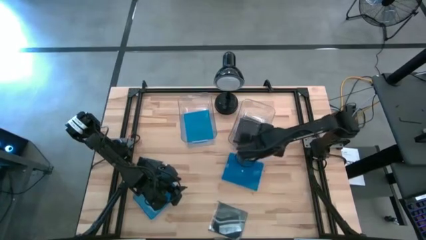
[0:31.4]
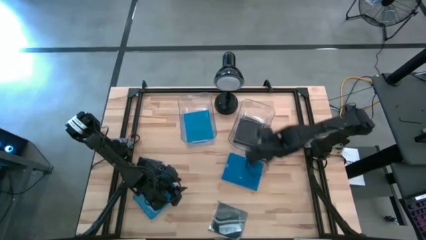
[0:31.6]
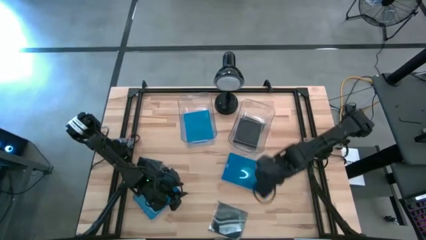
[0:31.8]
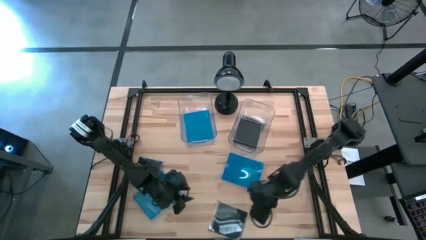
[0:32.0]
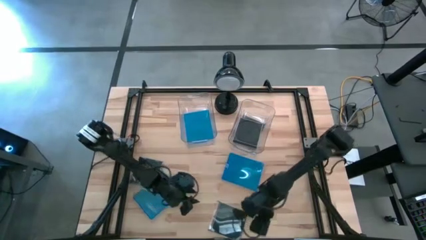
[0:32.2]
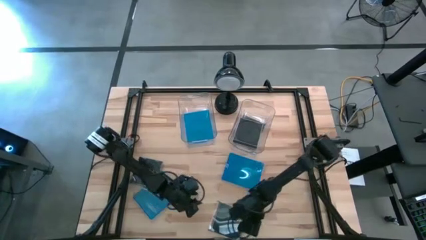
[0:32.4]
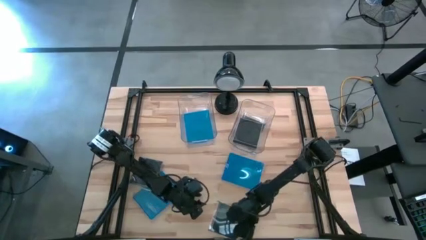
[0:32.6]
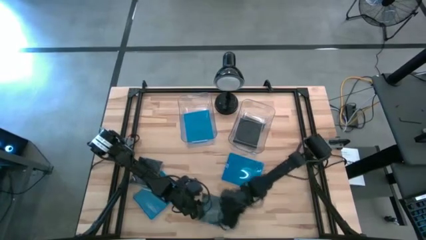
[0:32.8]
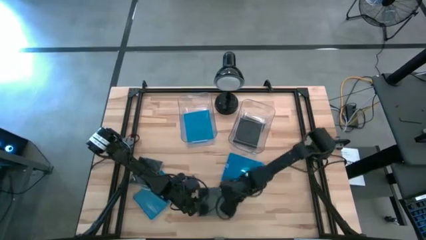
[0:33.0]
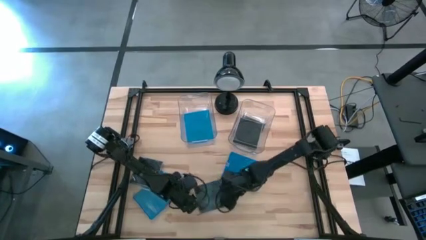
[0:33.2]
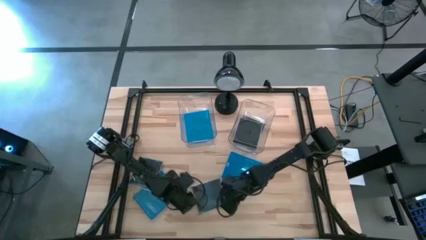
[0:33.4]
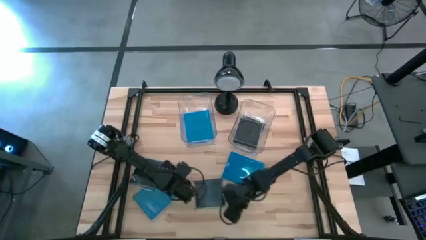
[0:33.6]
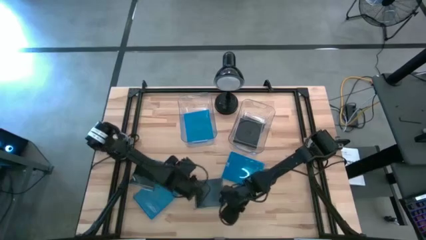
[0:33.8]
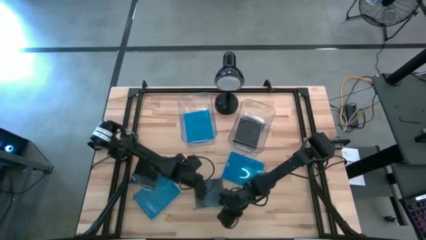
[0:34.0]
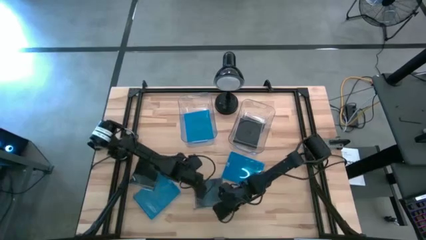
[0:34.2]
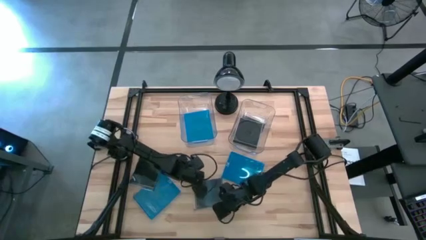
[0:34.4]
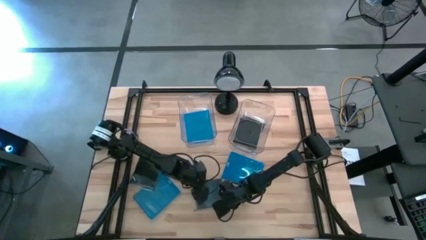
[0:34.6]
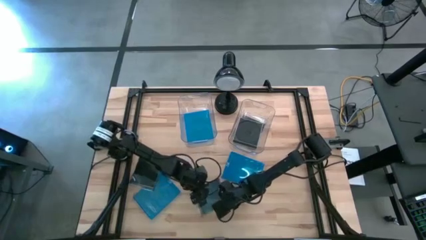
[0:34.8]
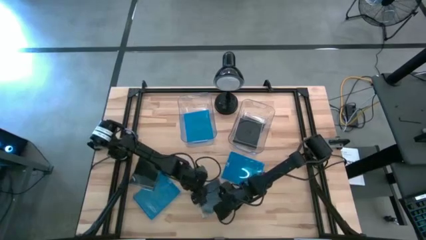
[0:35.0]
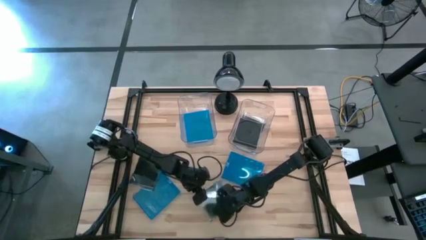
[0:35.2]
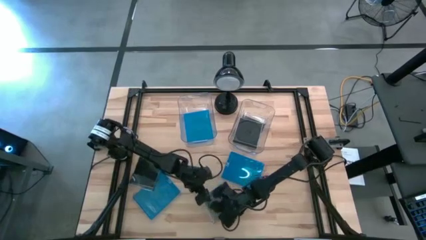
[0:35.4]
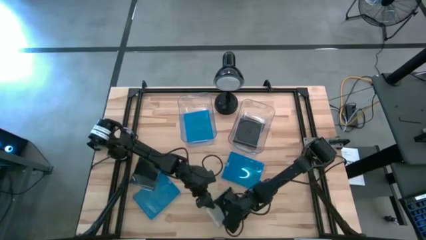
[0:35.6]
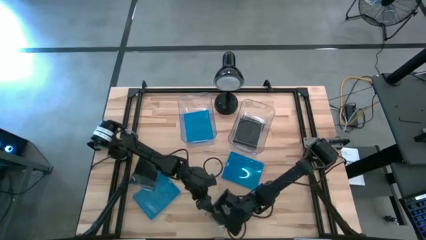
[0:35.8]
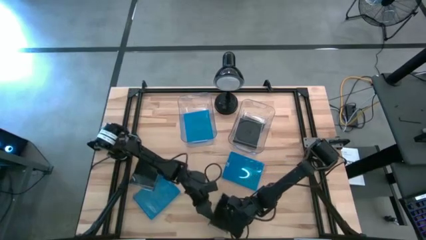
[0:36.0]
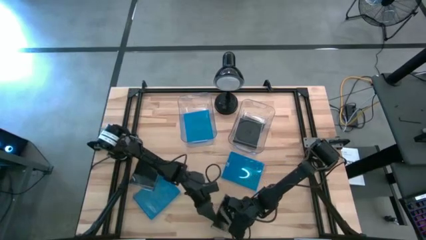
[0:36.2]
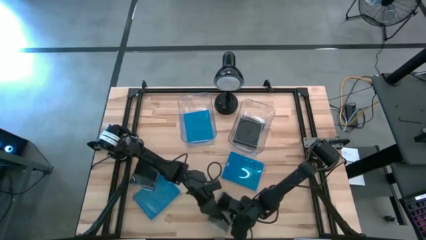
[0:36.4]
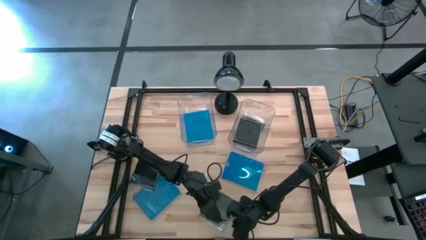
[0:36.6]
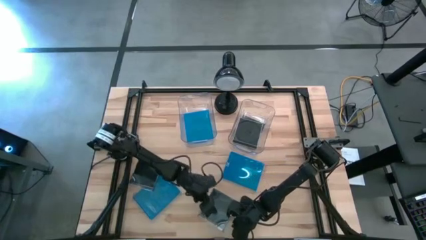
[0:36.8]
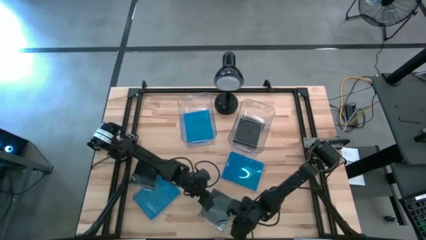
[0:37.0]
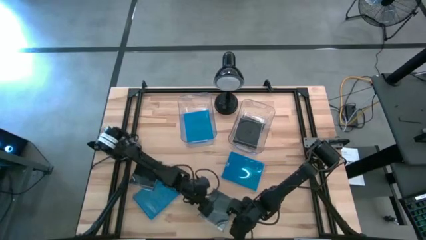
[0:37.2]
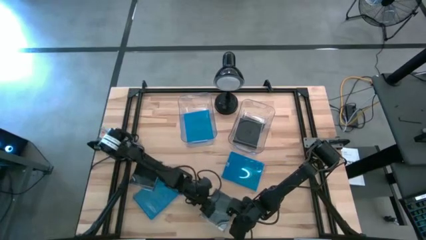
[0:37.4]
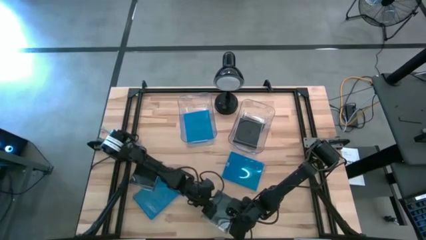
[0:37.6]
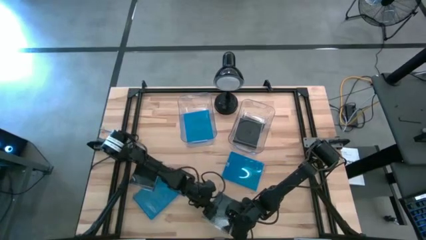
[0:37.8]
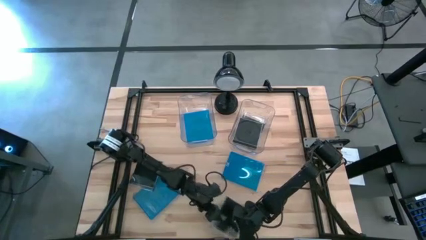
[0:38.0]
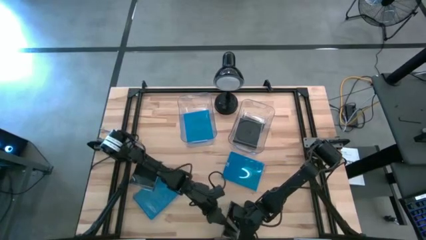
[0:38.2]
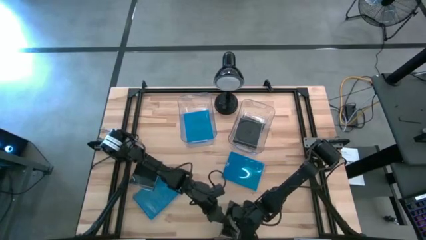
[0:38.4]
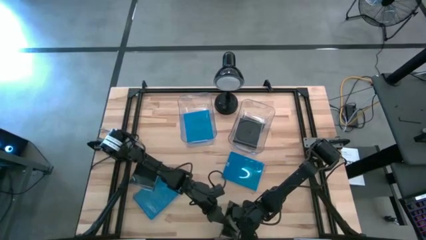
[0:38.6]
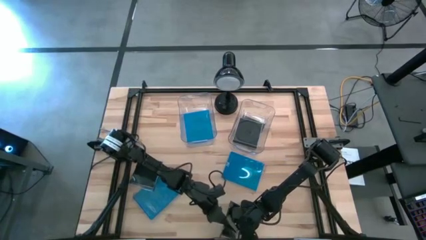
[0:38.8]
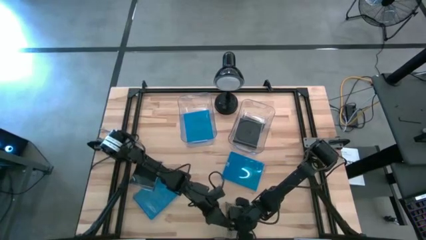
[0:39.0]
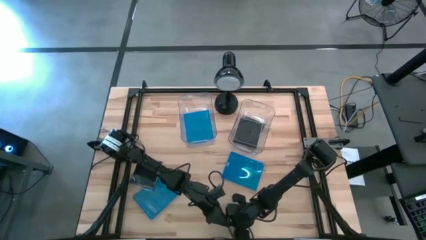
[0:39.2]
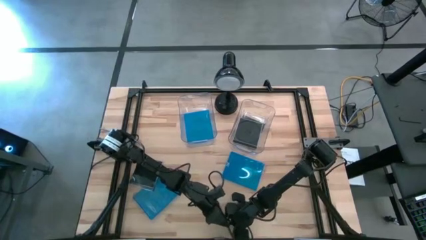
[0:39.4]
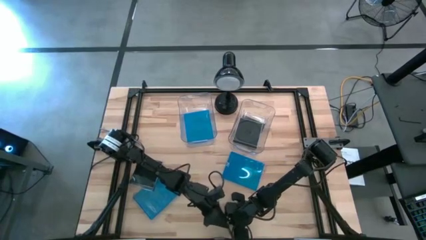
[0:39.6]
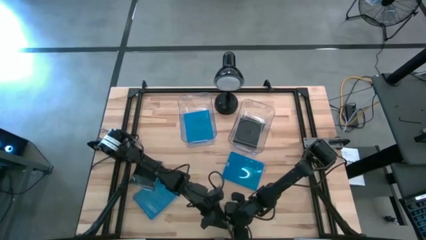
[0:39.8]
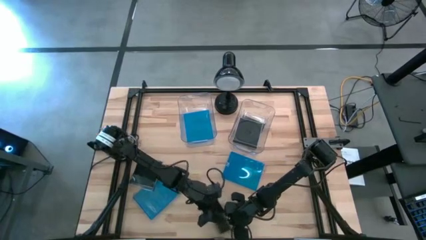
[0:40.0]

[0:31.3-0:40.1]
Task: Pick & place jewel cases by type
Put the black CD case into the right transparent bin

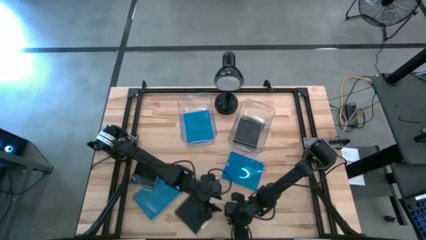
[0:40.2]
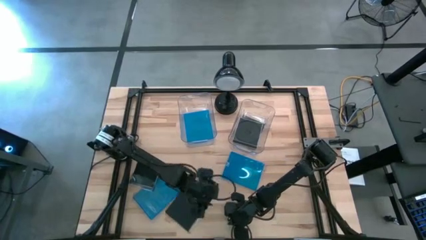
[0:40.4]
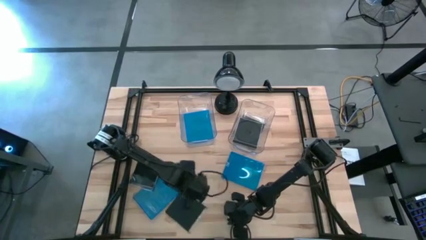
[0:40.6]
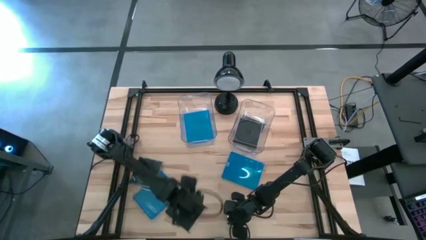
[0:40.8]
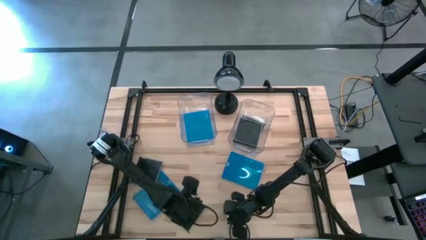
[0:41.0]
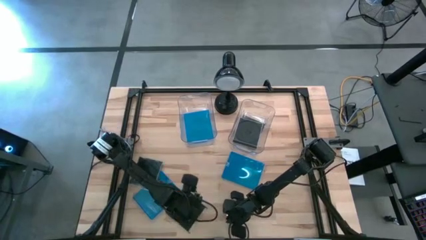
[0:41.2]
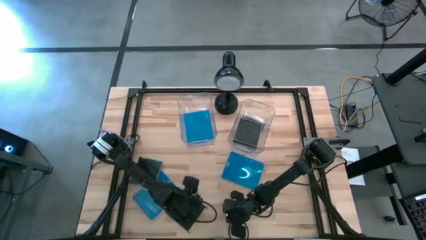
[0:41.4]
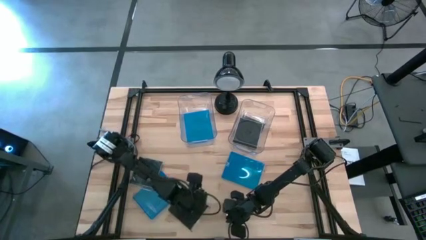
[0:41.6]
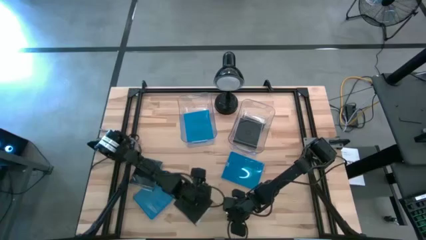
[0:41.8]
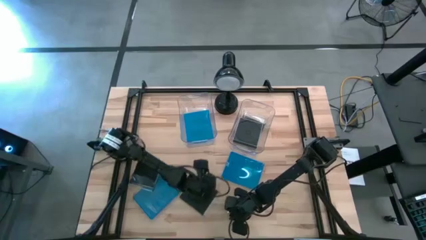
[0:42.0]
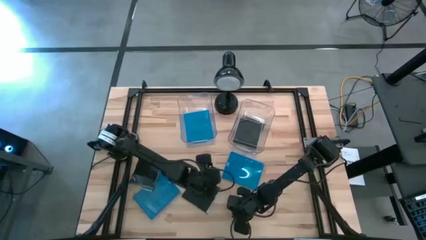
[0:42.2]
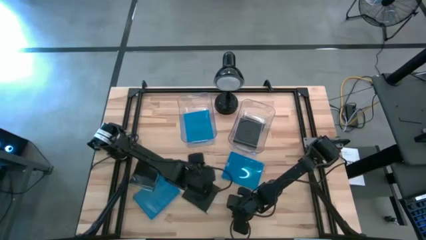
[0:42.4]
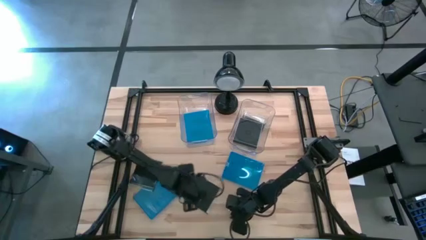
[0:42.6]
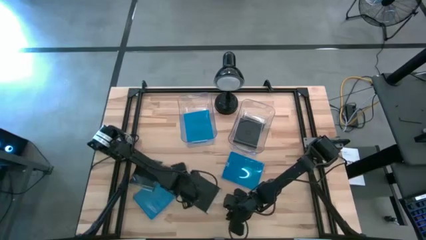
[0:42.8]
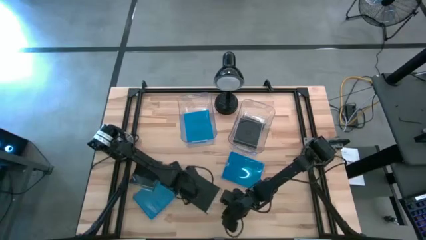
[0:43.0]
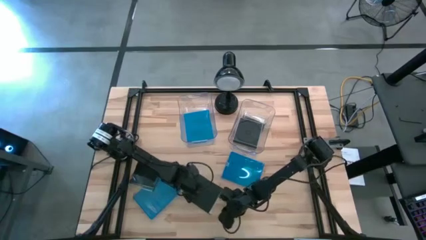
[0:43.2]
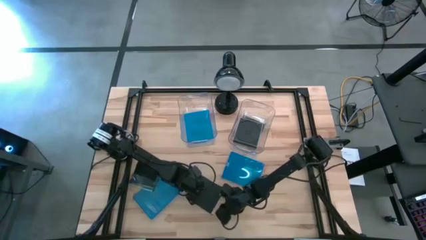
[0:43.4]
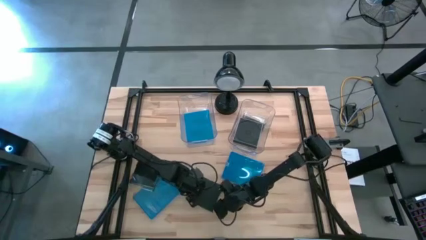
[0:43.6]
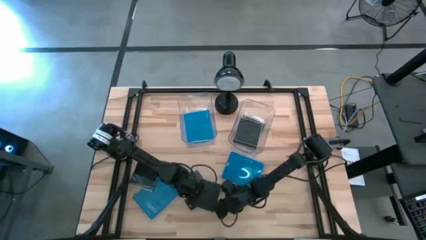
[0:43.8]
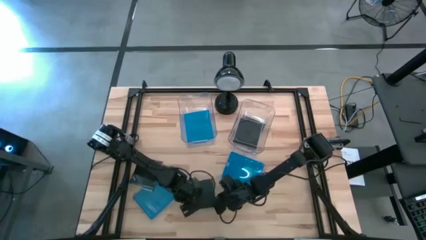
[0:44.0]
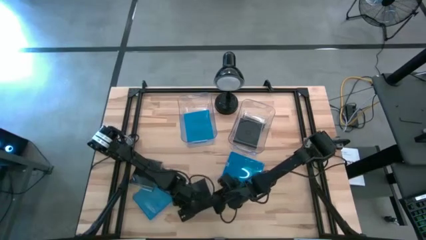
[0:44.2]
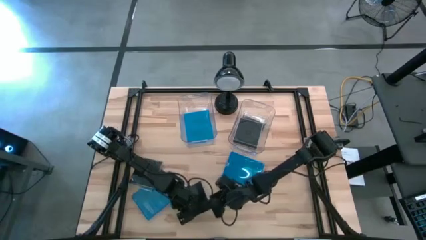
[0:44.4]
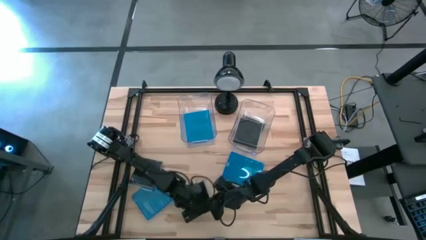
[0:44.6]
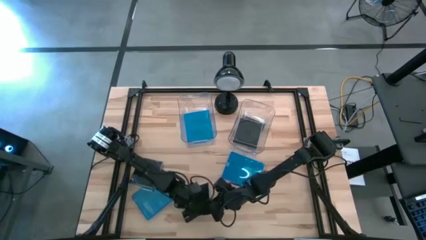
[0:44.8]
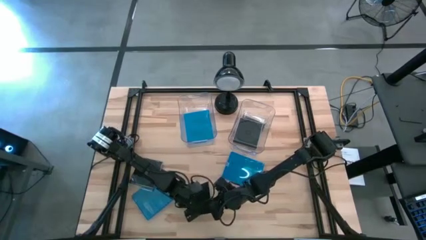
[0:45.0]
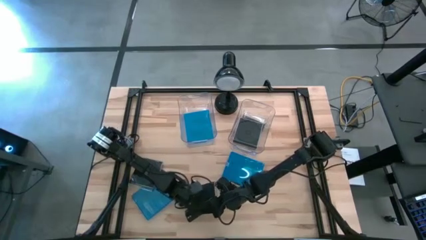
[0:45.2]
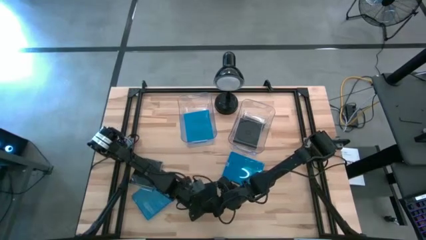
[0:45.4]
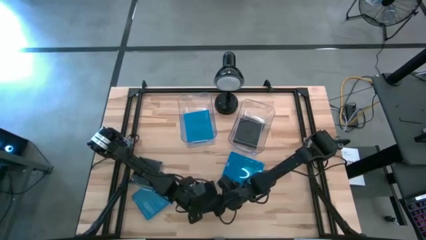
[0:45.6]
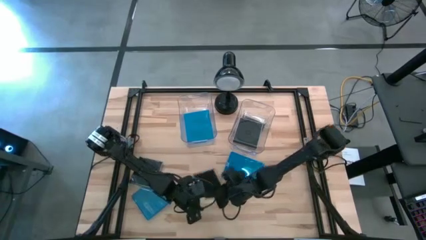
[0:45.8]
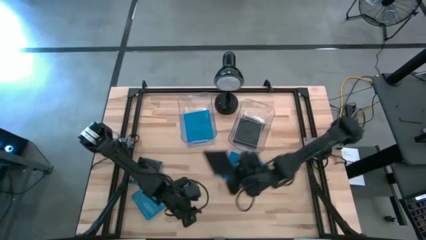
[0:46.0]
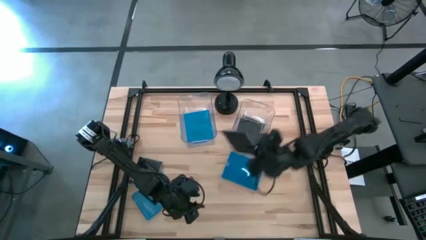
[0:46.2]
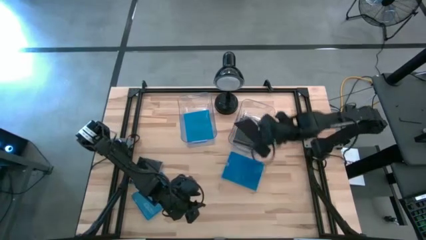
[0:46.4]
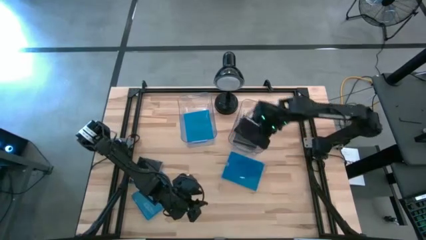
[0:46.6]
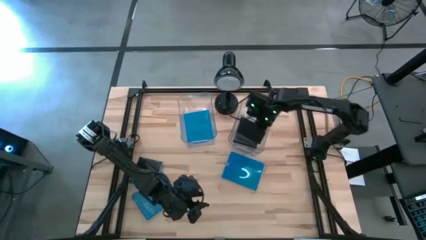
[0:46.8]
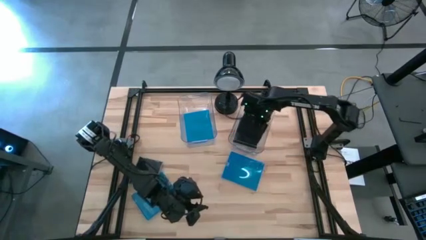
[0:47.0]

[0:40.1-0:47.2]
Put the black CD case into the right transparent bin

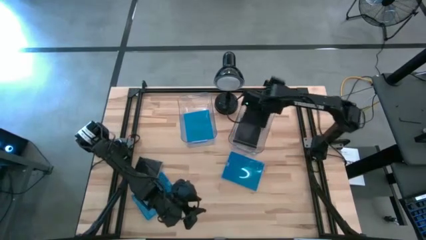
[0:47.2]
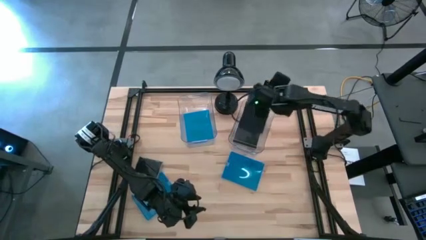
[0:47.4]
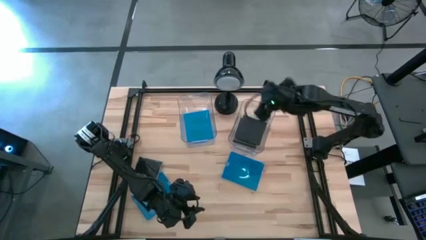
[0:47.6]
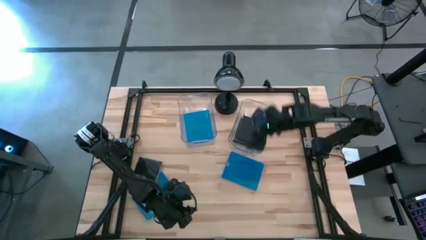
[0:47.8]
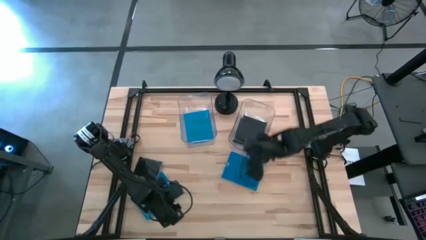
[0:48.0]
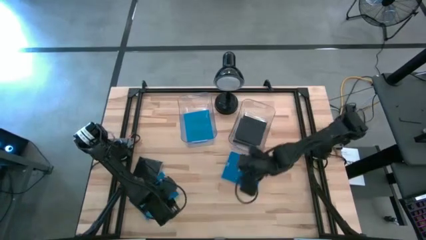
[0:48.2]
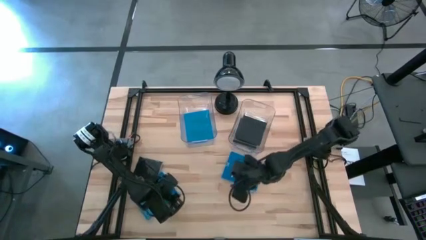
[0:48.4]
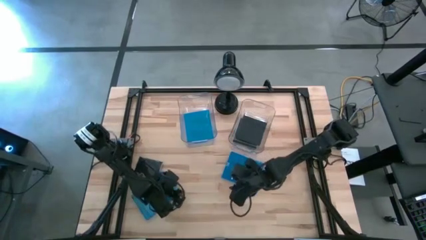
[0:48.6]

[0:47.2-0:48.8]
Put the blue CD case into the left transparent bin
